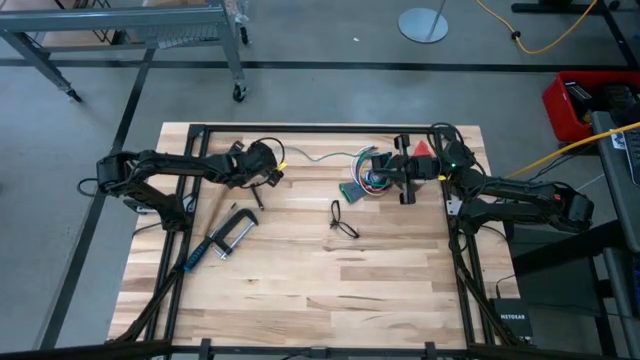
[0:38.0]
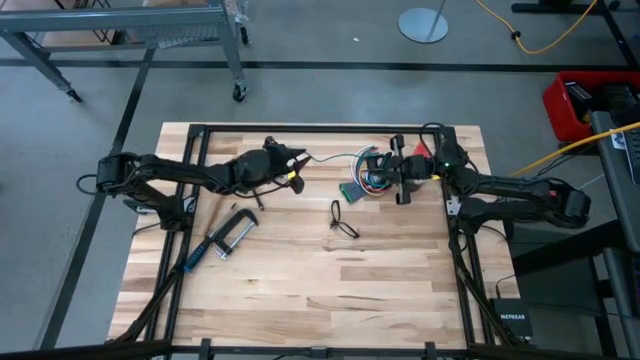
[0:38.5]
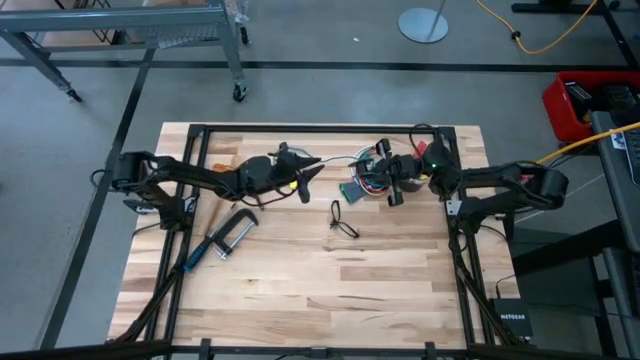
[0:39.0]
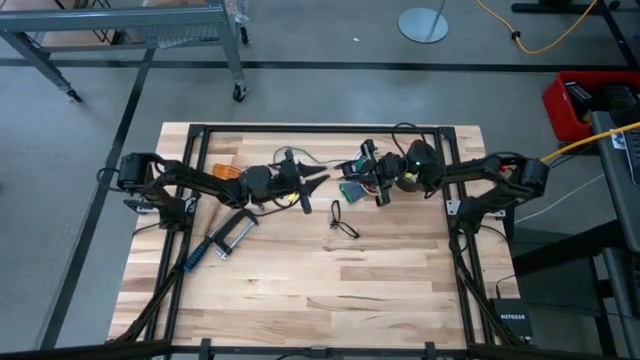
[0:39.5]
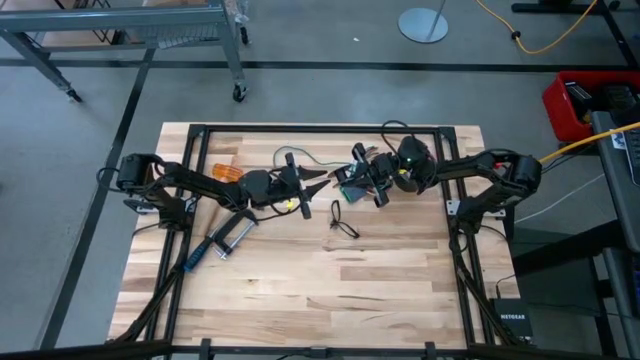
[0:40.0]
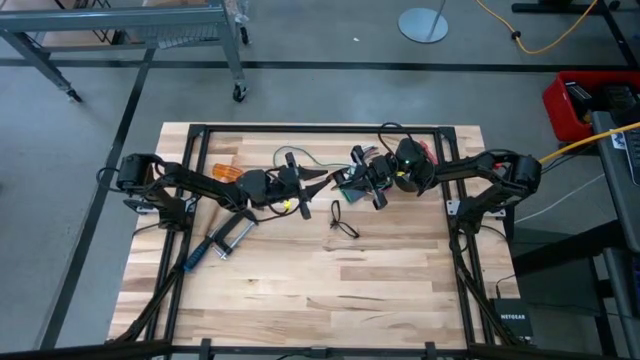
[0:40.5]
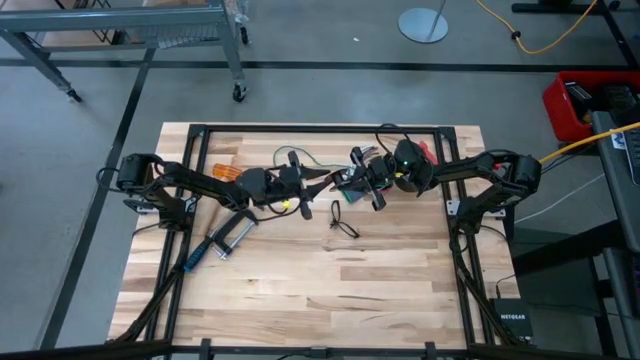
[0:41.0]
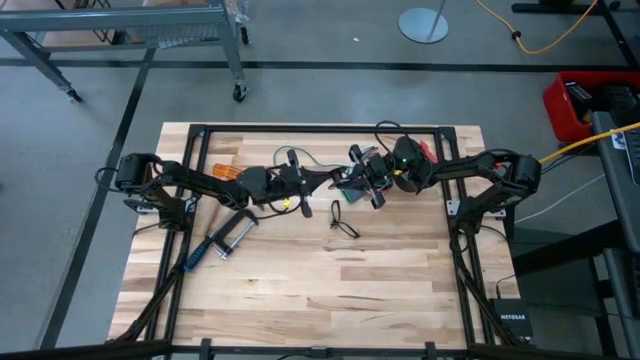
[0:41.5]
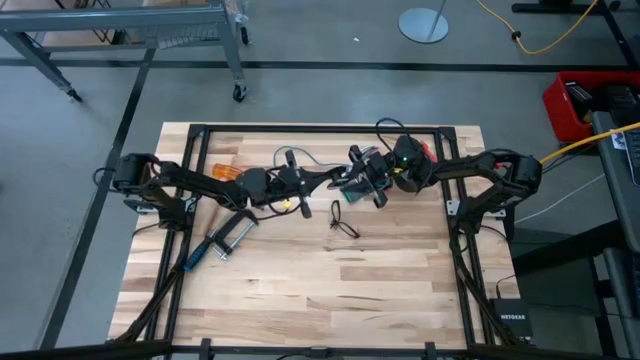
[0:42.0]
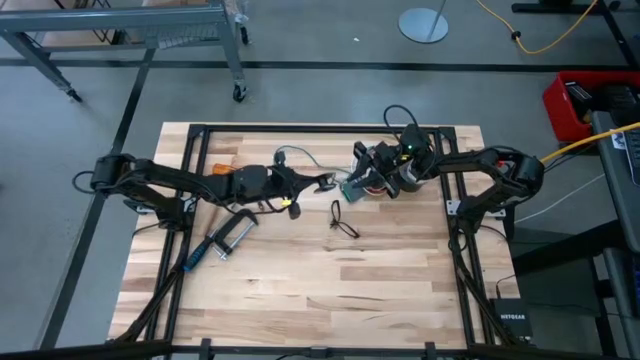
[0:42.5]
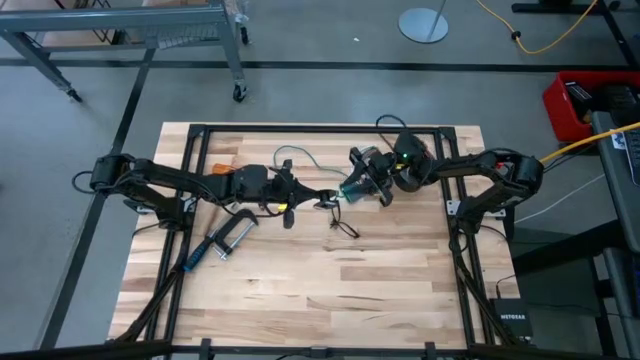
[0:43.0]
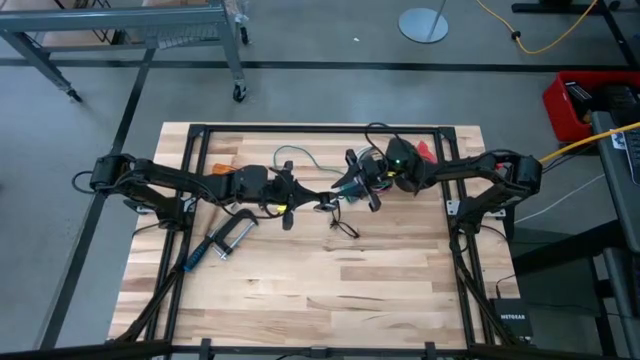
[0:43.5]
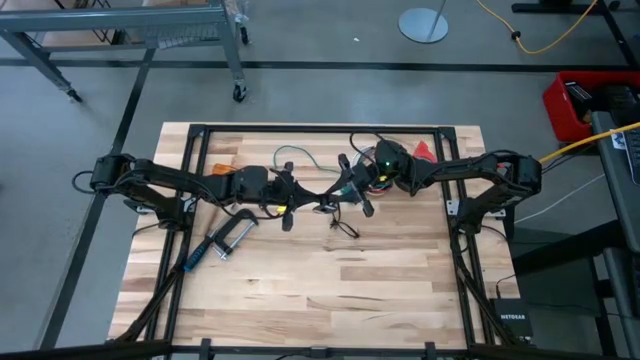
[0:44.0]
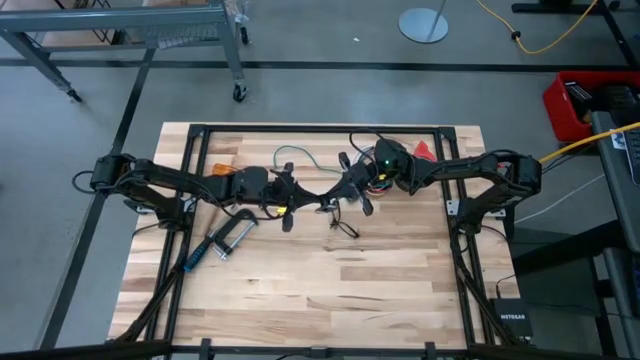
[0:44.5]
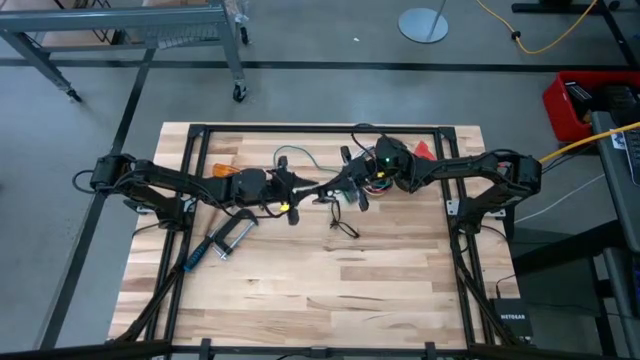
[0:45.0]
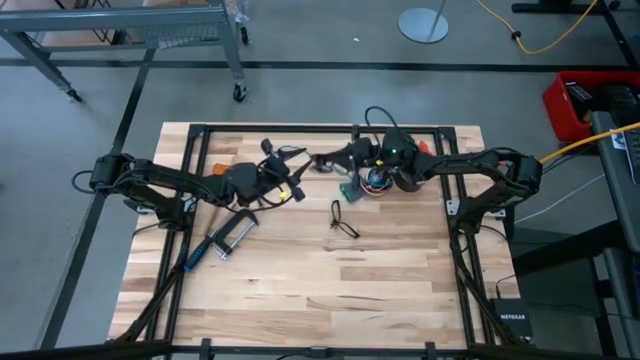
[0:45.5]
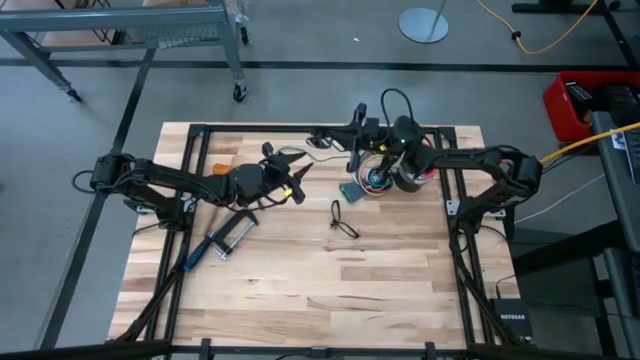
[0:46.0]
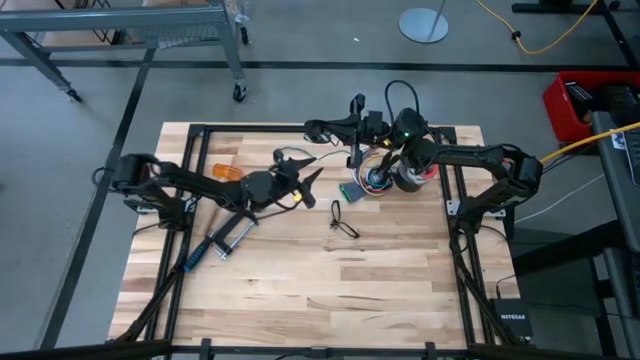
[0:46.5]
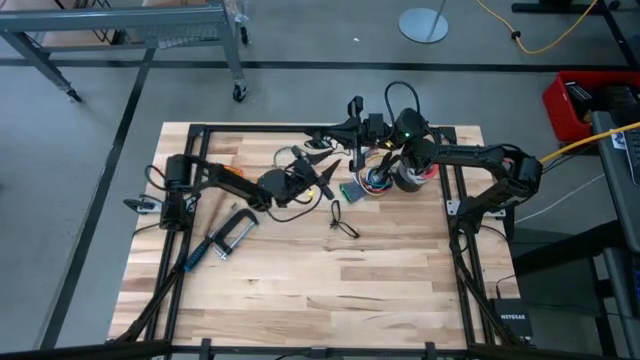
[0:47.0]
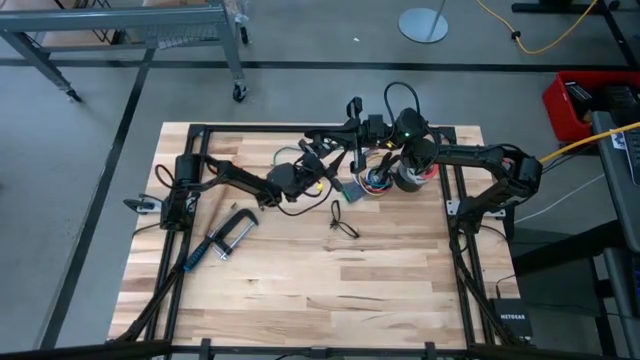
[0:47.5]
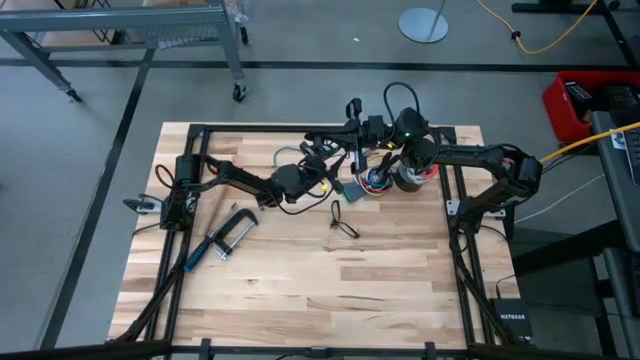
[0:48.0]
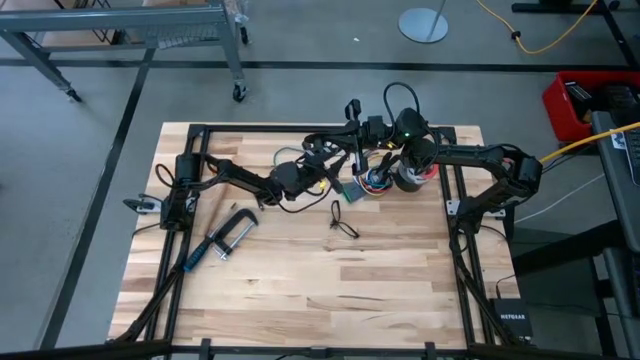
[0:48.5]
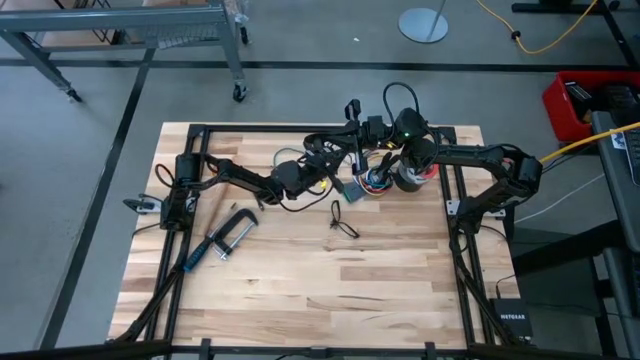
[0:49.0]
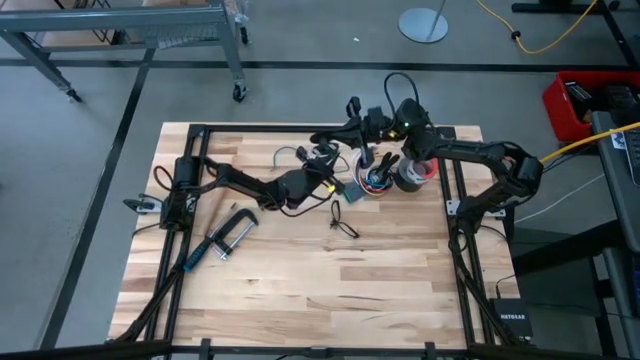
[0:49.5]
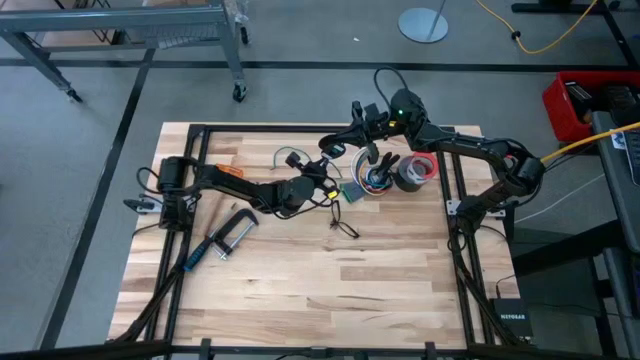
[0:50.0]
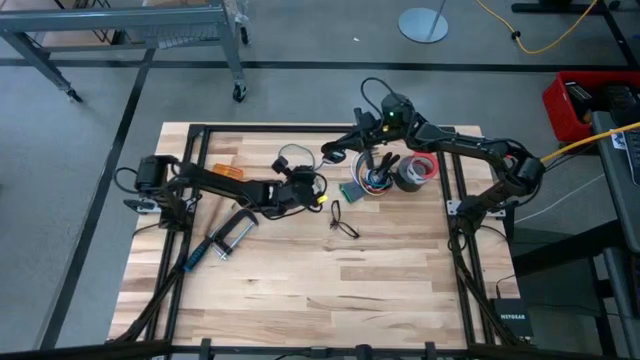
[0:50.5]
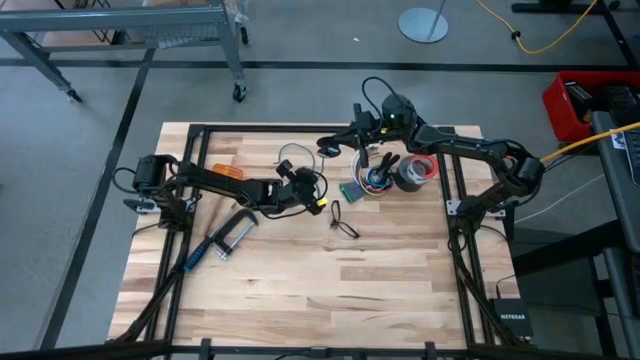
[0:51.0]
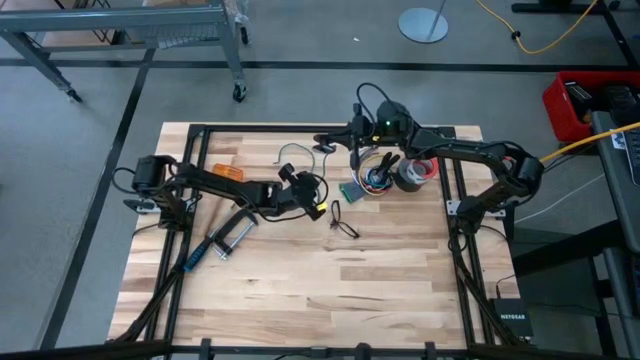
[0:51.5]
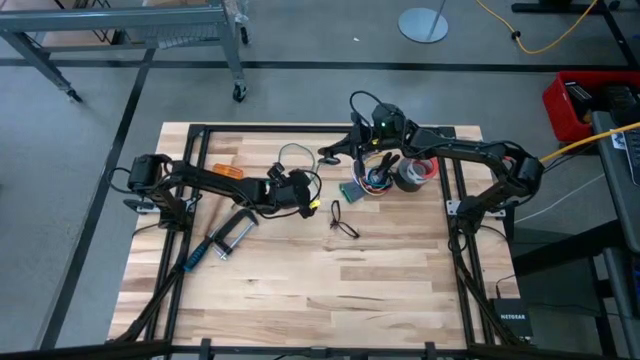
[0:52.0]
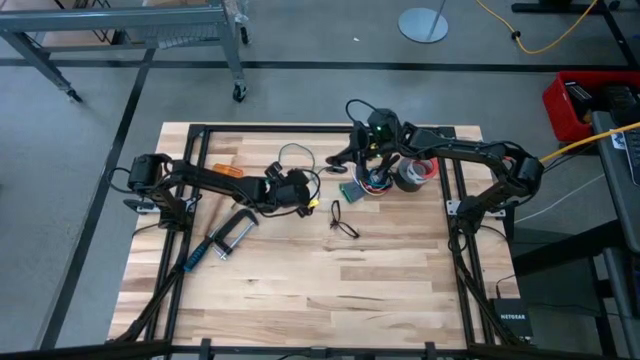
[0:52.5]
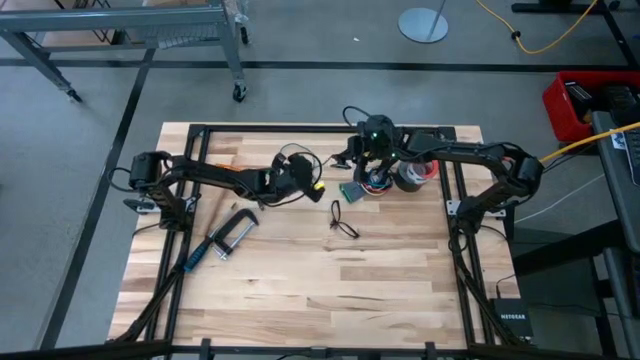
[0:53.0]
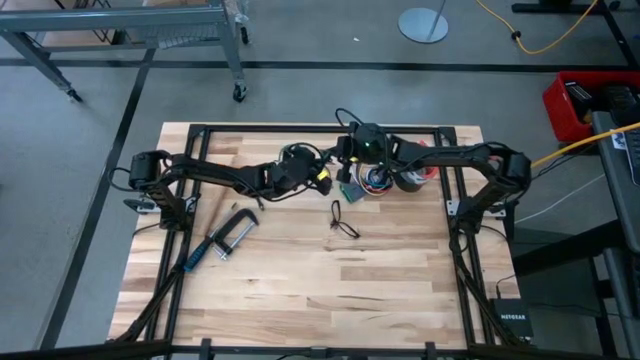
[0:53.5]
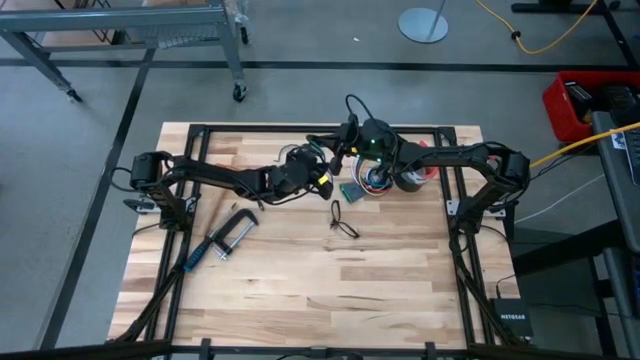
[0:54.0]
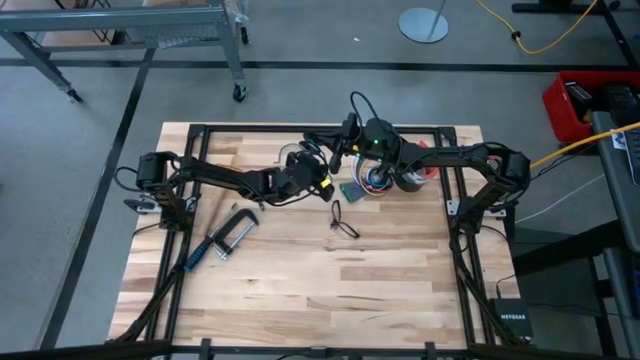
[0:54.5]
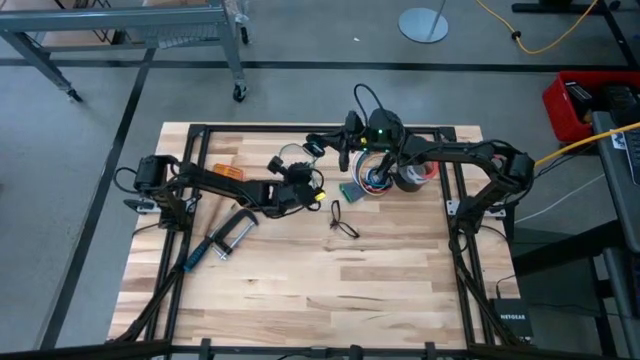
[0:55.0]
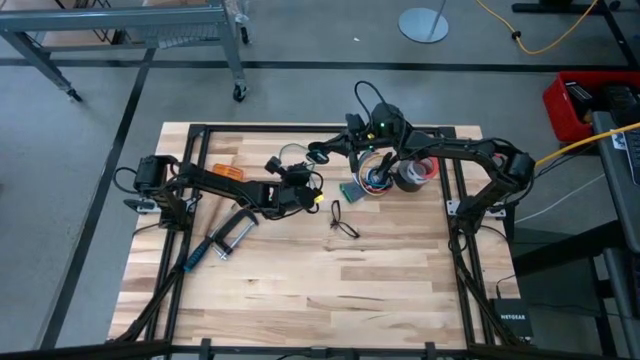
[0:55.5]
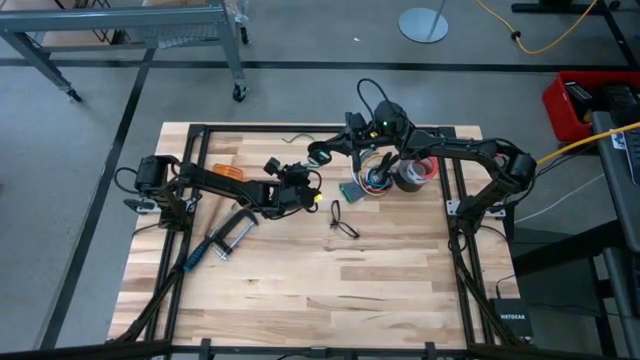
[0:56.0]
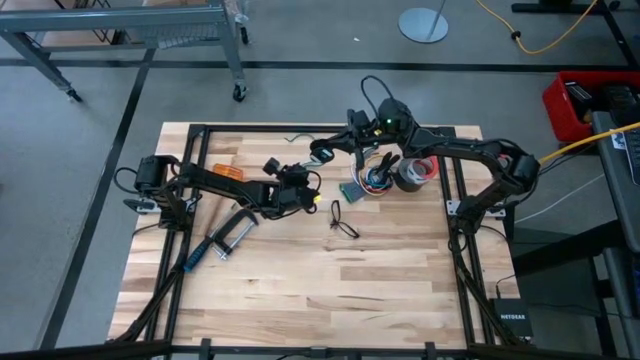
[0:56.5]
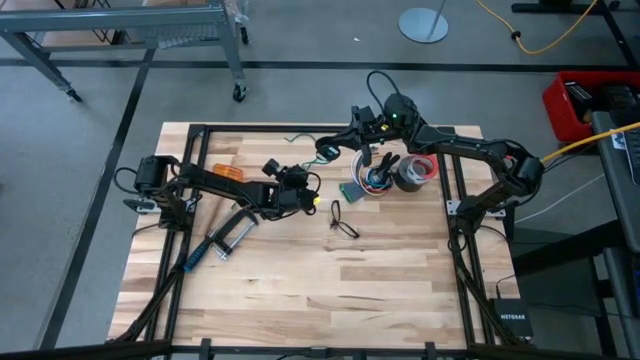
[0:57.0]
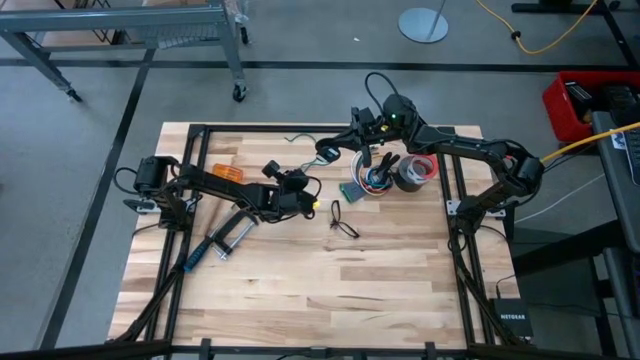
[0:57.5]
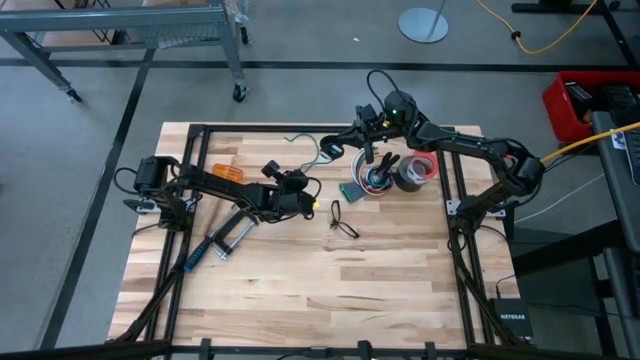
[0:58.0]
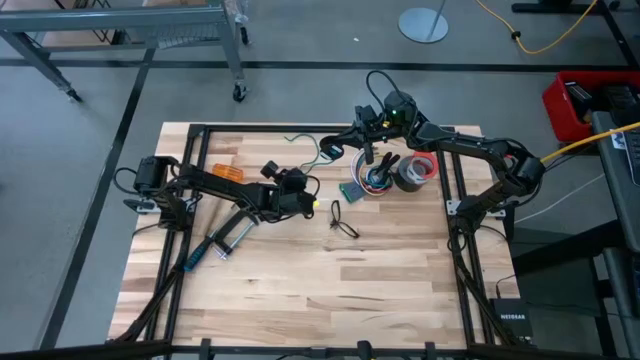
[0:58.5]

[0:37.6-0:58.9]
Task: Coil cords
Coil the green wire on the black spool
